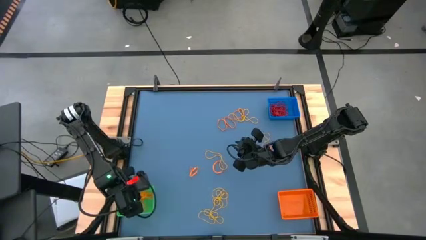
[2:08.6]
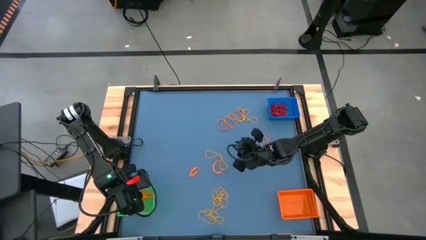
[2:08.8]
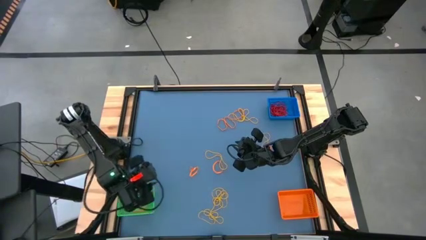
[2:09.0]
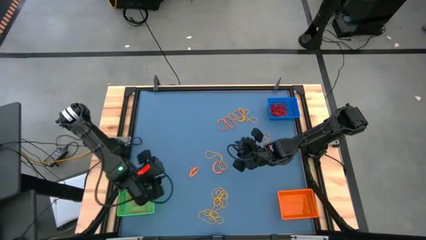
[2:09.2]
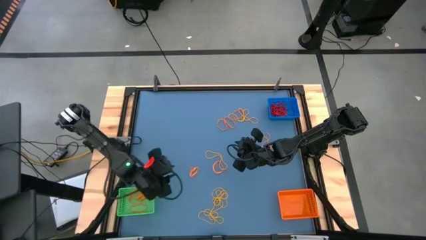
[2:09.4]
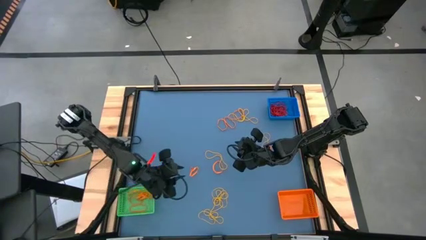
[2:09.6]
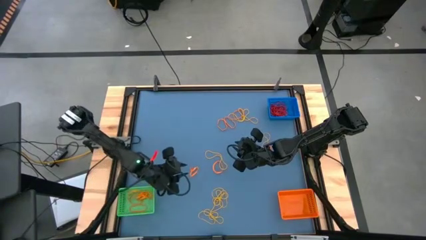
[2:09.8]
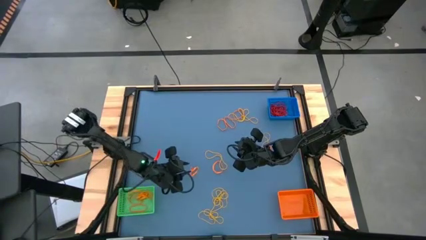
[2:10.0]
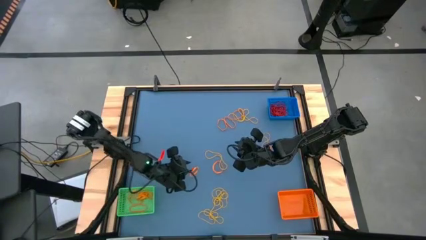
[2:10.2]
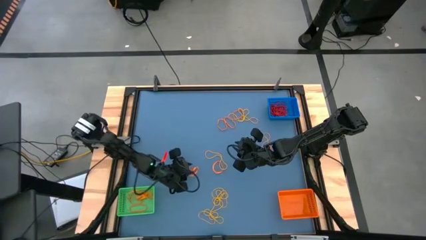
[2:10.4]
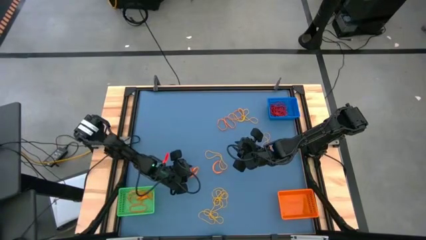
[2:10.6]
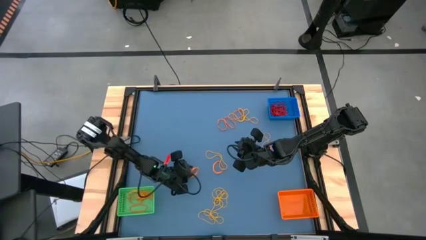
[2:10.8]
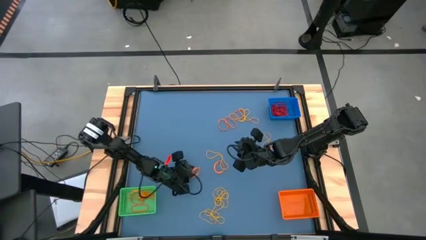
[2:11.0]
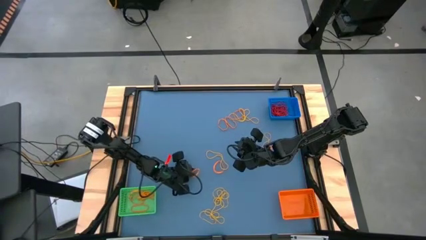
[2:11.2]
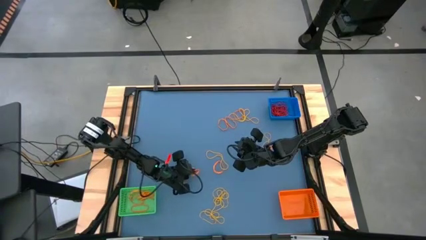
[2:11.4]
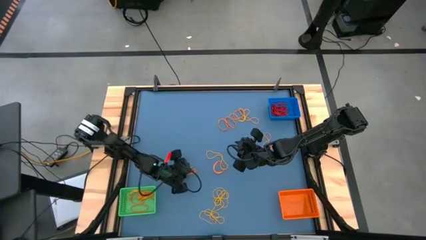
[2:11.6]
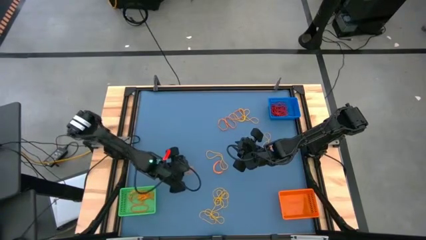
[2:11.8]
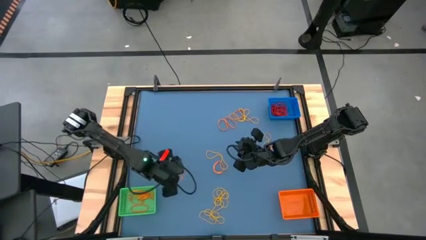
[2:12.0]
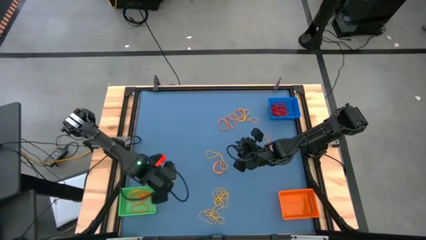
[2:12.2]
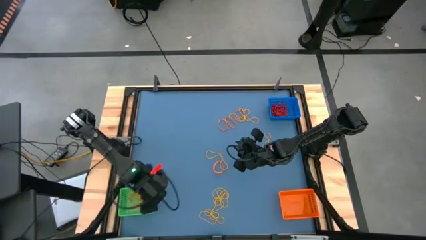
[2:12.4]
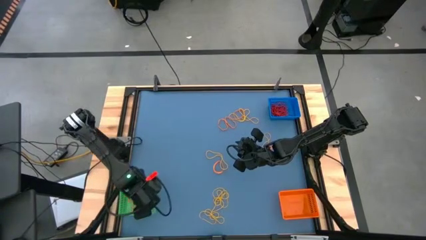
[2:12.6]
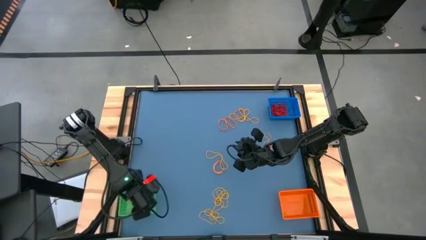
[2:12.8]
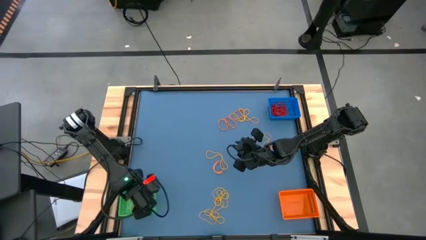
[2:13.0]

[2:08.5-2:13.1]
Task: Sort rubber bands into baskets
Put the orange rubber band into the green bin

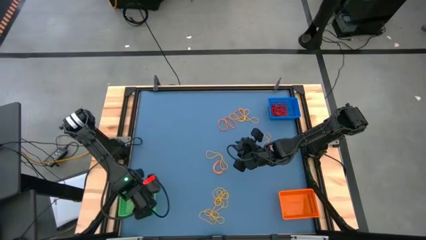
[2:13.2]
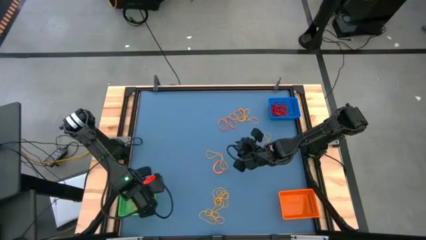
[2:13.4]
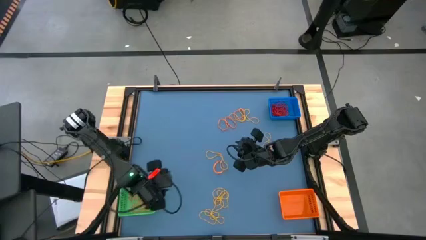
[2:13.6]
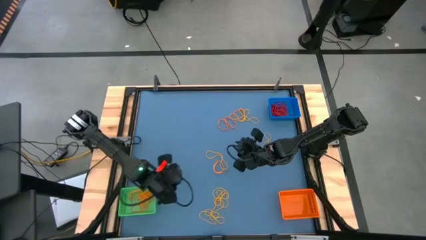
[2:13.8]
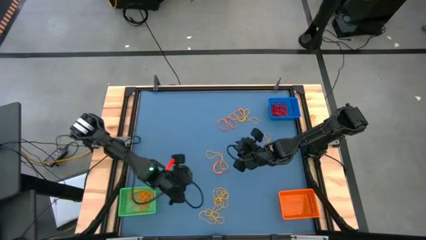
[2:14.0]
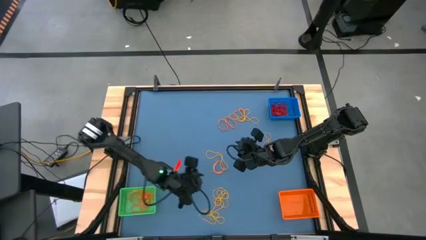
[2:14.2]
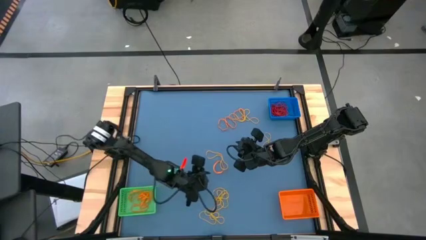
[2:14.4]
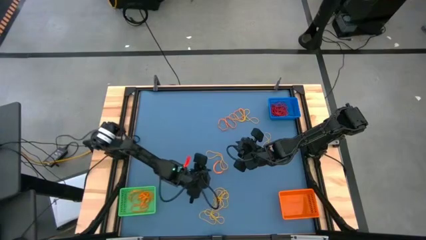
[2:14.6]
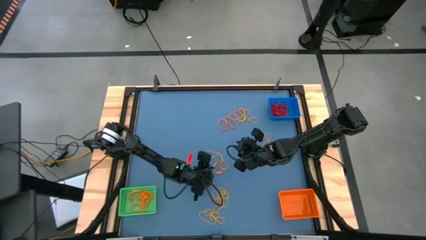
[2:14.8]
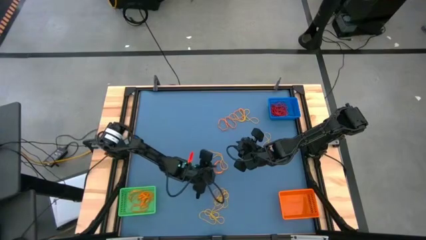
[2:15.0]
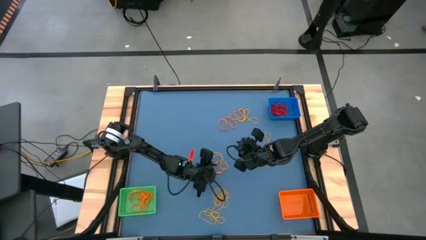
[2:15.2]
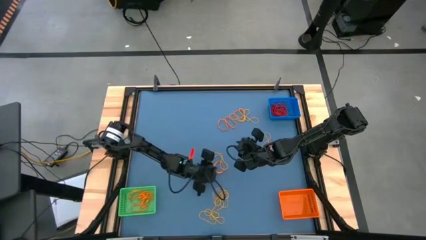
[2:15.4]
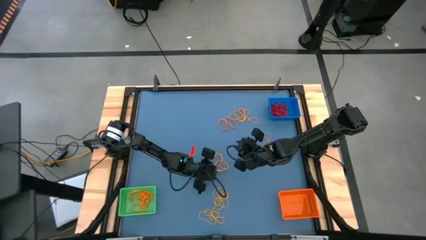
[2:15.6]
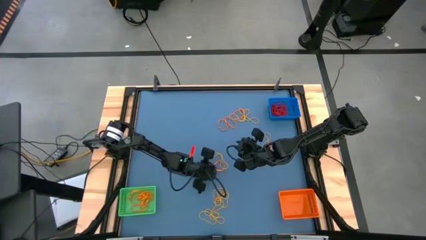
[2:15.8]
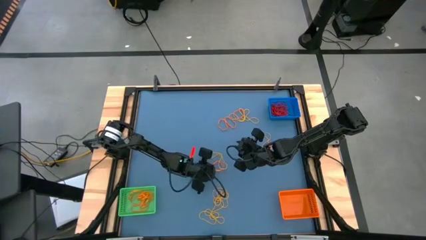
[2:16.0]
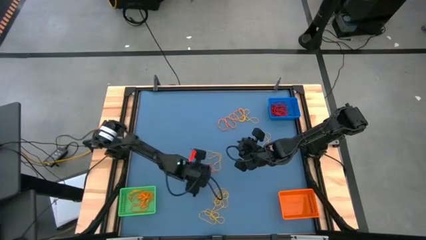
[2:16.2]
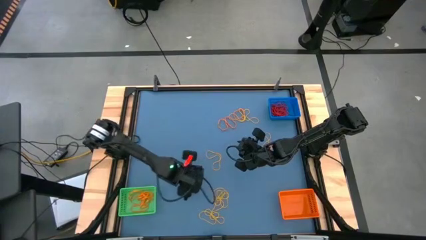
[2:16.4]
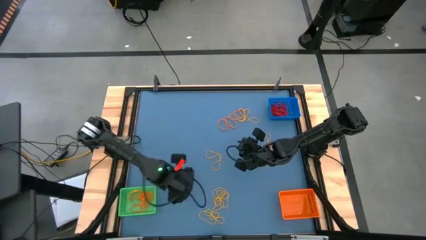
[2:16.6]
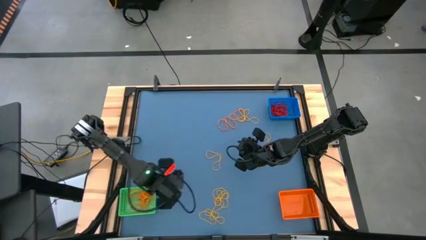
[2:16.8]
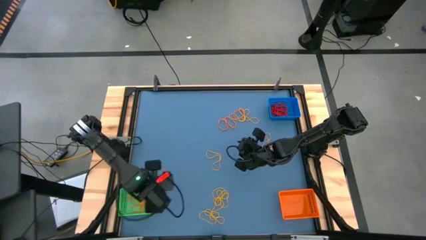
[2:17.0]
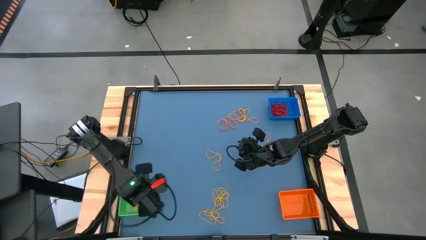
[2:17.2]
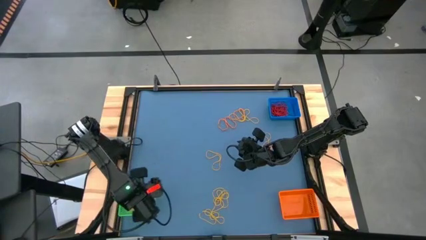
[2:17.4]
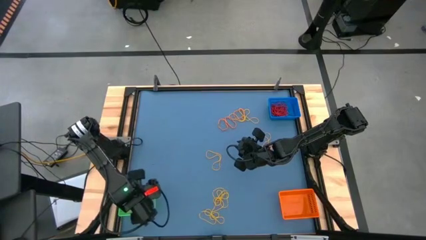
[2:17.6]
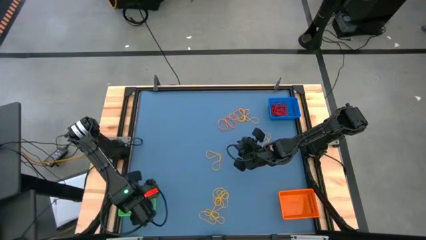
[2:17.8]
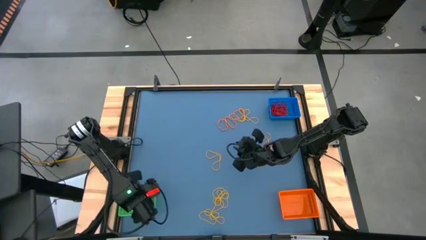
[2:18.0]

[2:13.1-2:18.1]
Put the orange rubber band into the green bin

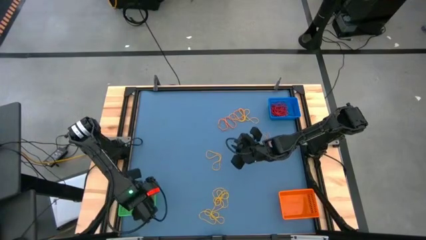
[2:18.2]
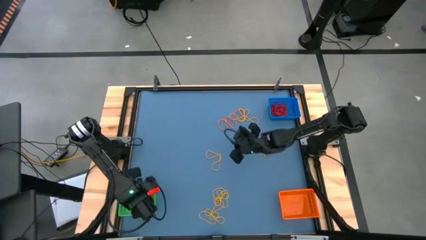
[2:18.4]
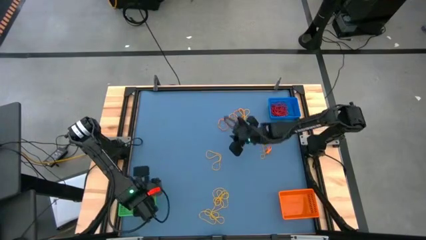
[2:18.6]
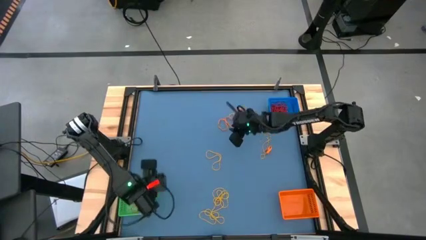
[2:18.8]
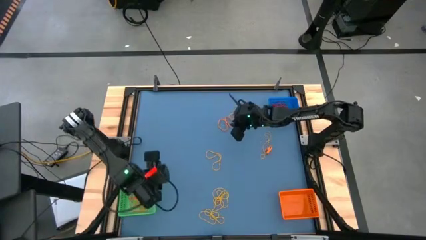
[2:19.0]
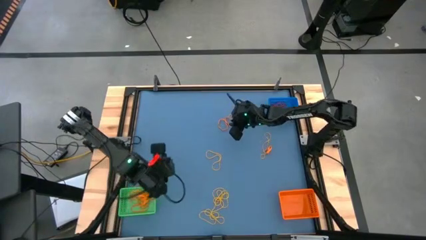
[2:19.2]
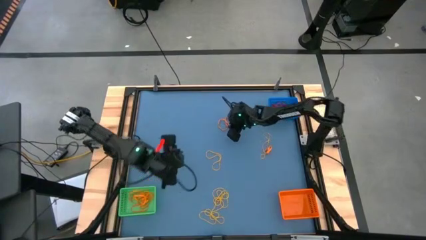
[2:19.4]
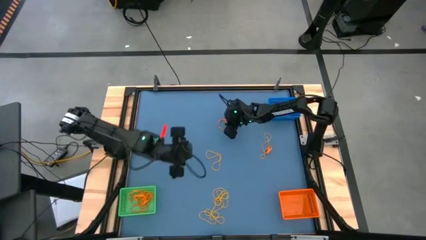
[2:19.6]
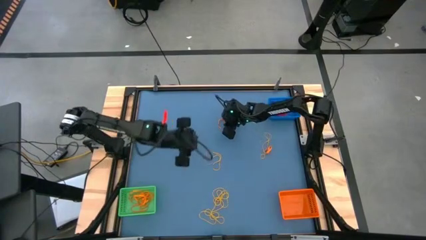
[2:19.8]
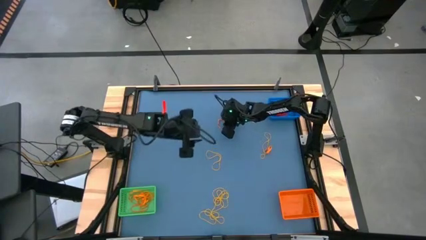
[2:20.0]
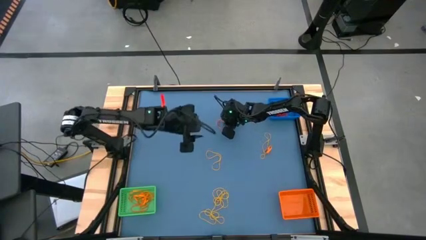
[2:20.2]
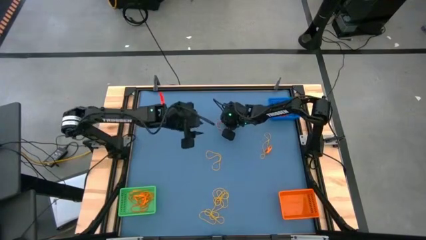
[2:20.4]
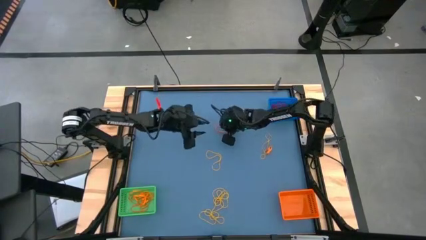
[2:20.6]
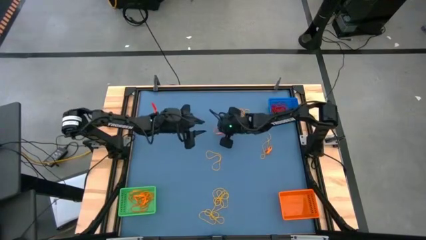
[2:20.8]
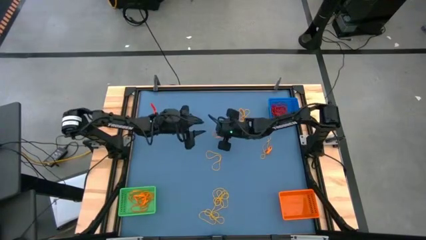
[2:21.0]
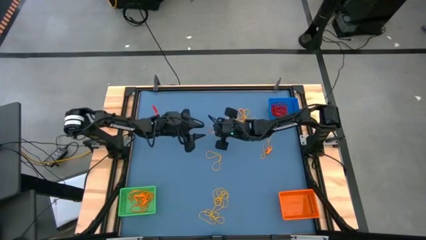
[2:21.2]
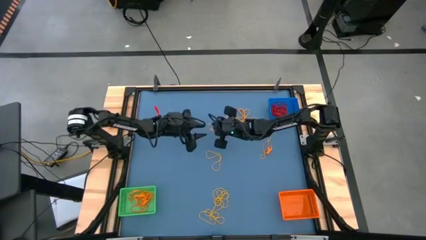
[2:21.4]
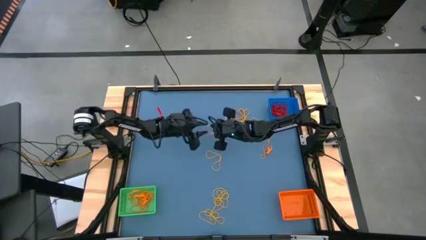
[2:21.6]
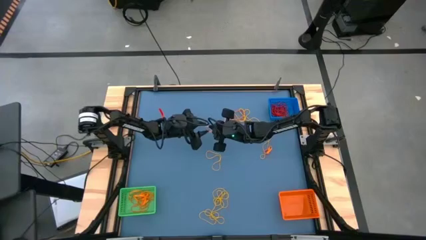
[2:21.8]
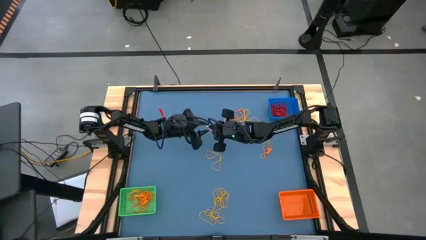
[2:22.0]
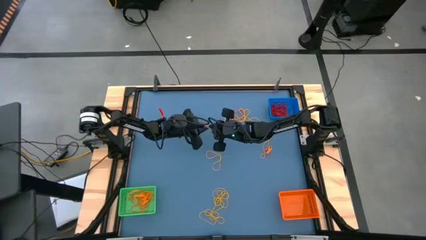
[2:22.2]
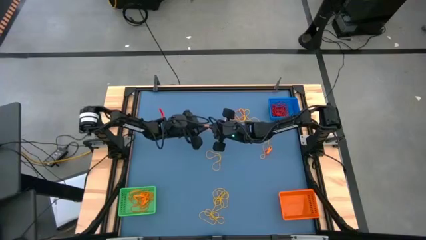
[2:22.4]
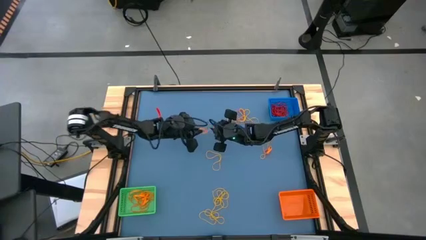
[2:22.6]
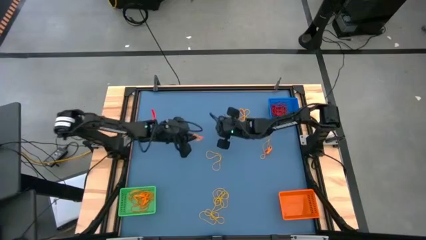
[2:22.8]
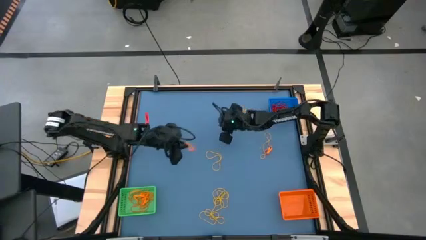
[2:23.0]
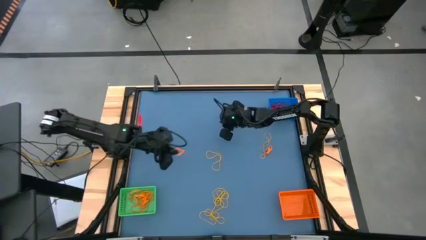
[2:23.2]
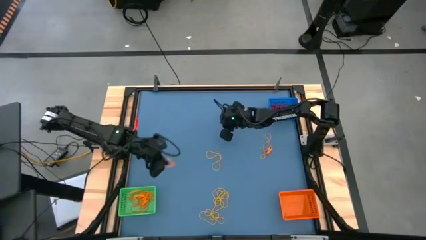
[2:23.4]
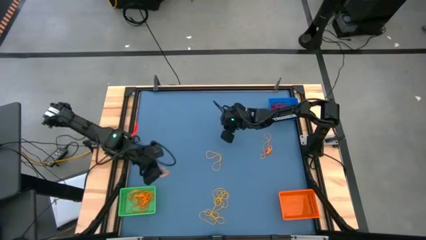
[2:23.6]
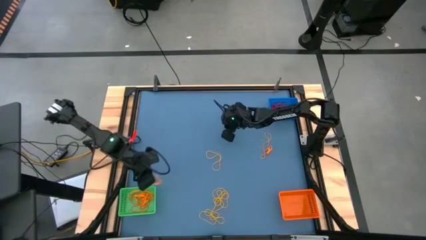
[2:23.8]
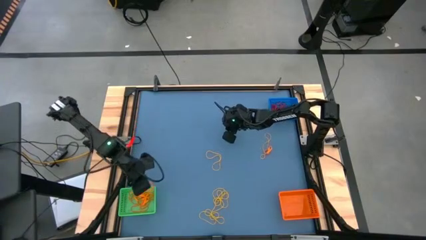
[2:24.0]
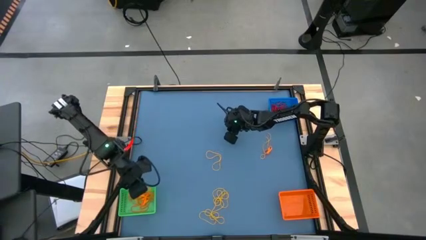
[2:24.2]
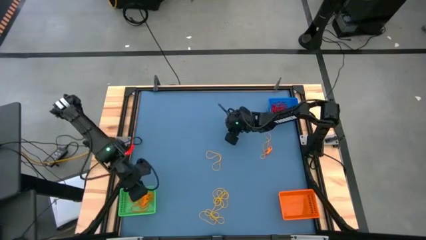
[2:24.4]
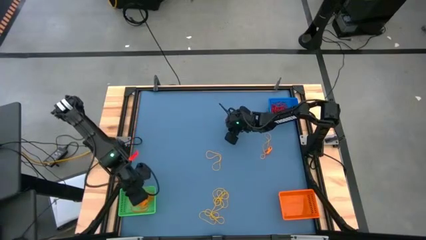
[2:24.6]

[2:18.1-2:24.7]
Put the orange rubber band into the green bin
